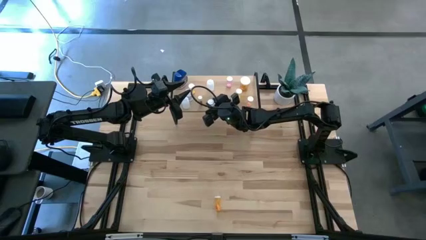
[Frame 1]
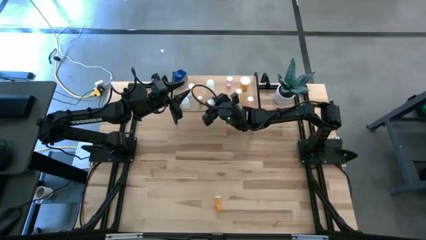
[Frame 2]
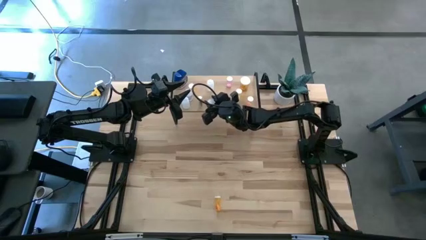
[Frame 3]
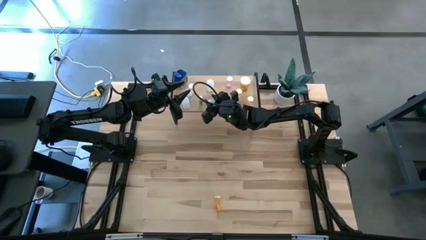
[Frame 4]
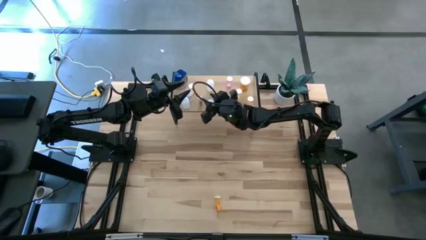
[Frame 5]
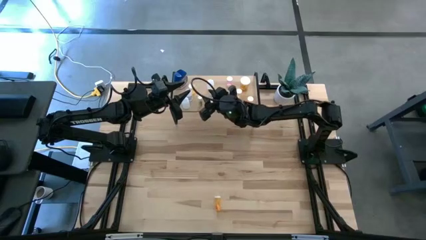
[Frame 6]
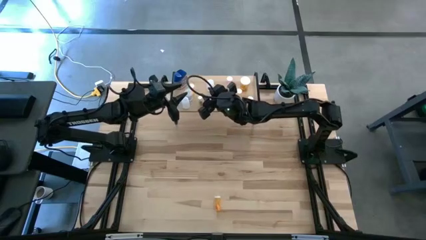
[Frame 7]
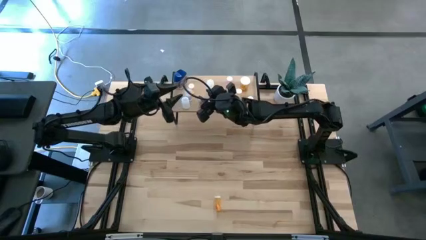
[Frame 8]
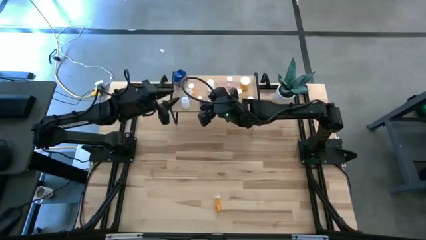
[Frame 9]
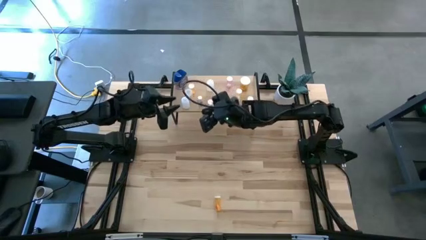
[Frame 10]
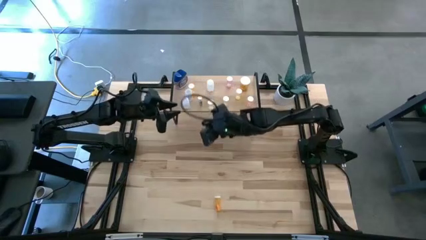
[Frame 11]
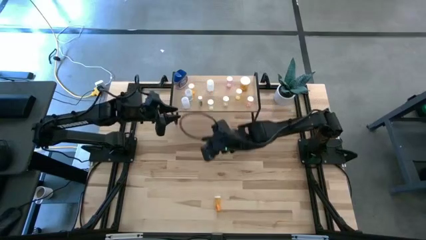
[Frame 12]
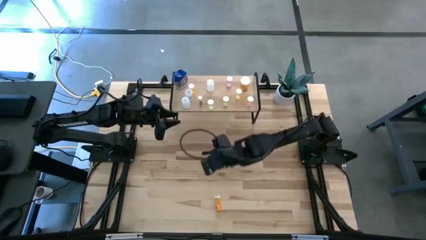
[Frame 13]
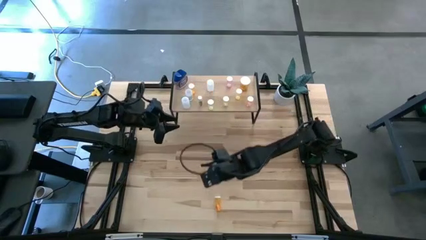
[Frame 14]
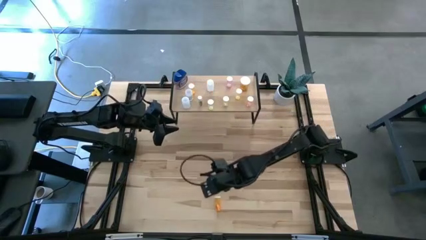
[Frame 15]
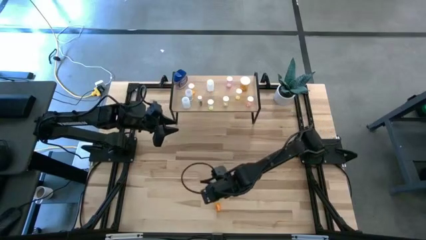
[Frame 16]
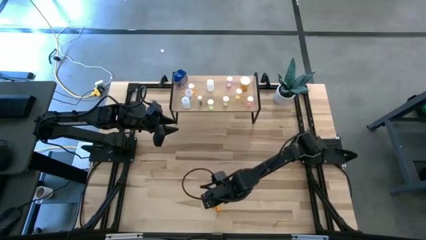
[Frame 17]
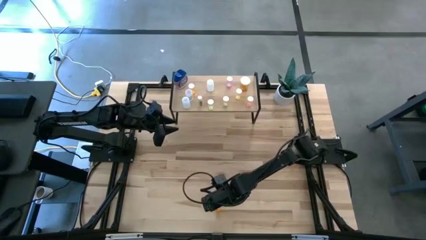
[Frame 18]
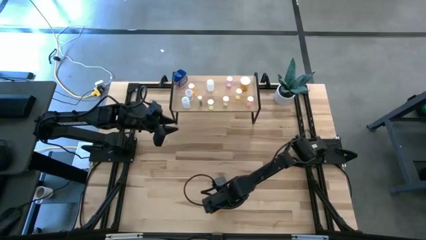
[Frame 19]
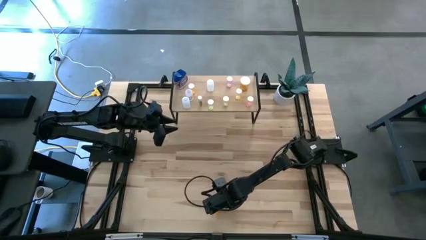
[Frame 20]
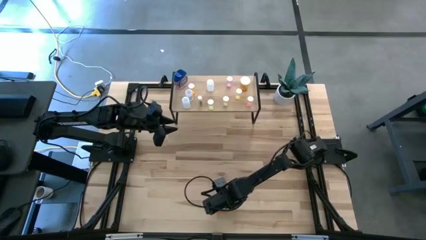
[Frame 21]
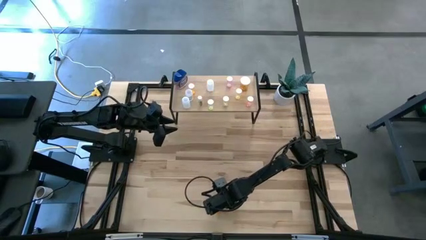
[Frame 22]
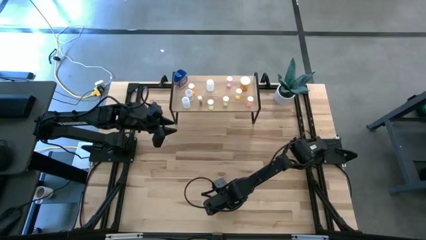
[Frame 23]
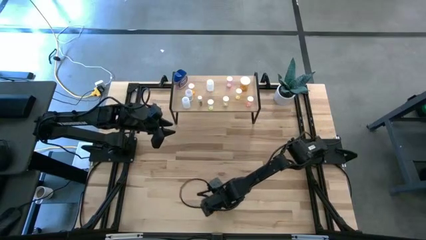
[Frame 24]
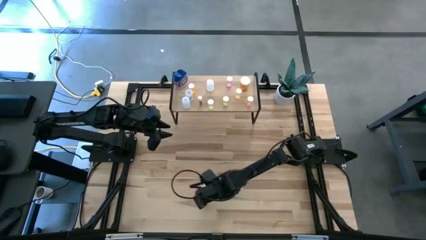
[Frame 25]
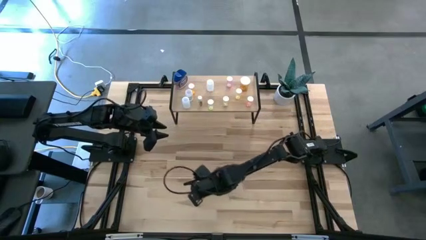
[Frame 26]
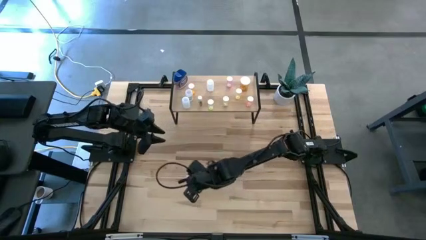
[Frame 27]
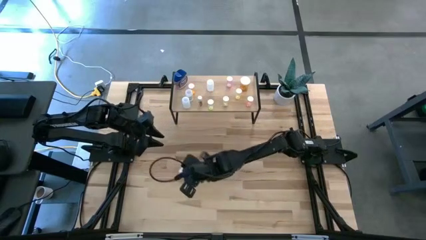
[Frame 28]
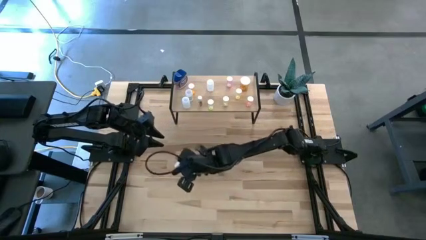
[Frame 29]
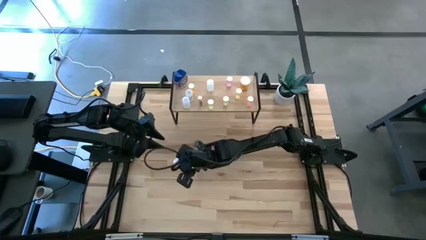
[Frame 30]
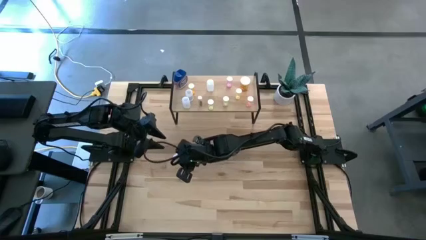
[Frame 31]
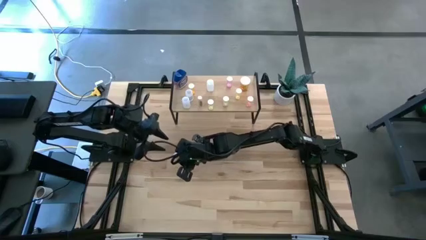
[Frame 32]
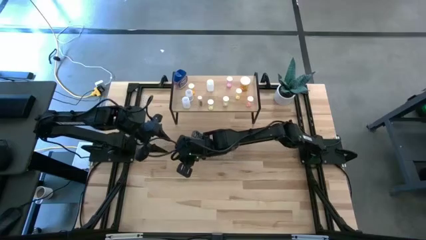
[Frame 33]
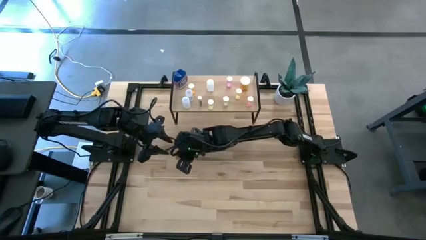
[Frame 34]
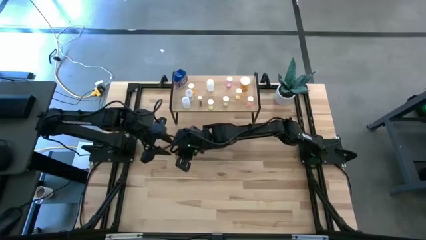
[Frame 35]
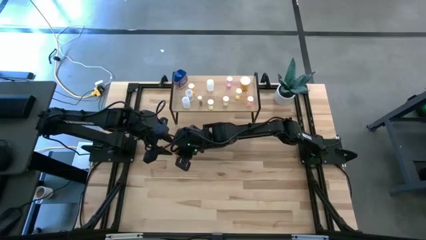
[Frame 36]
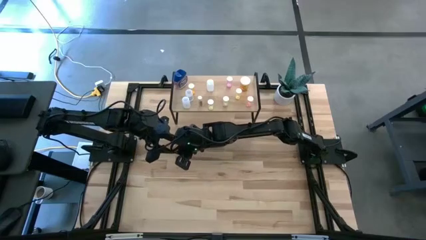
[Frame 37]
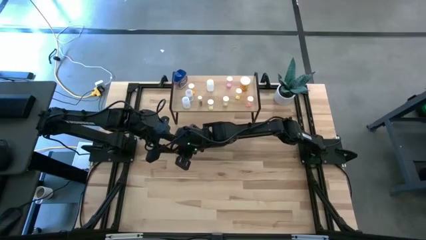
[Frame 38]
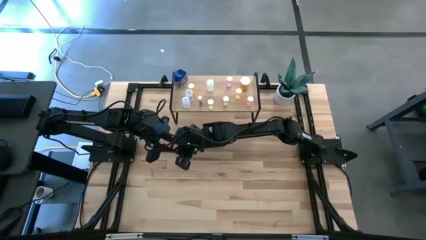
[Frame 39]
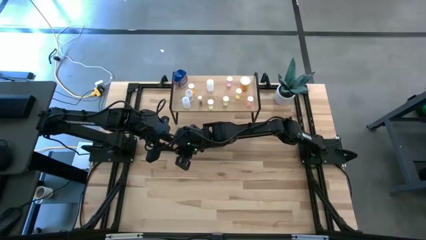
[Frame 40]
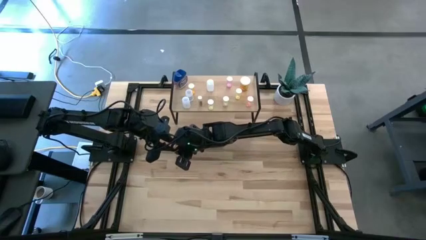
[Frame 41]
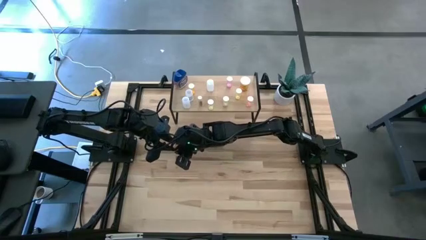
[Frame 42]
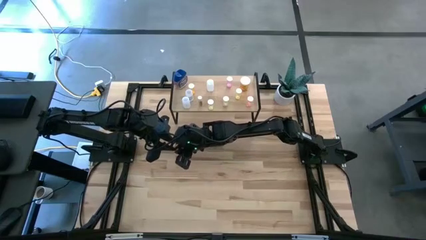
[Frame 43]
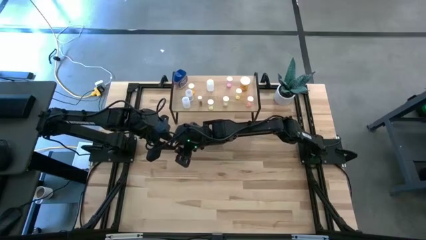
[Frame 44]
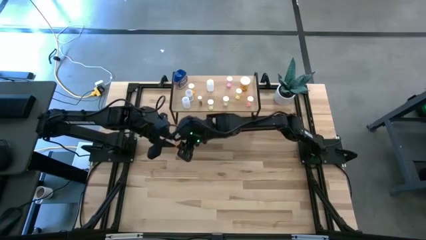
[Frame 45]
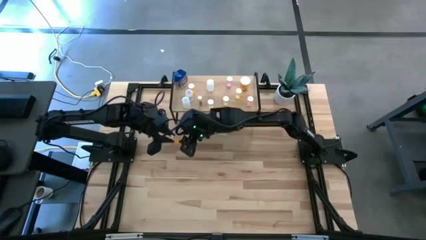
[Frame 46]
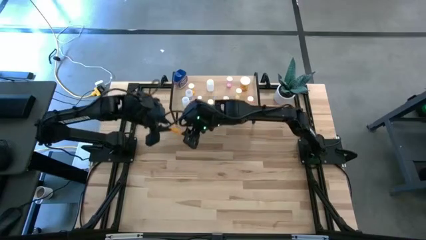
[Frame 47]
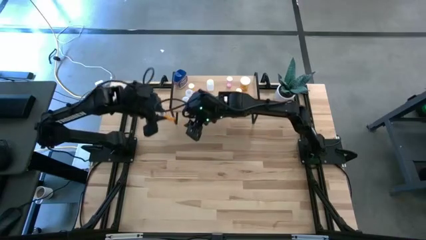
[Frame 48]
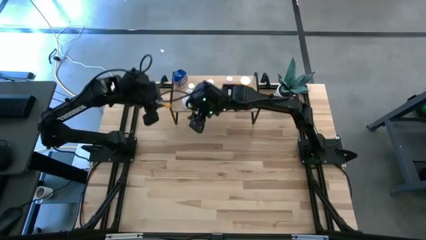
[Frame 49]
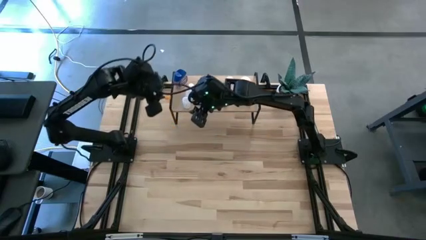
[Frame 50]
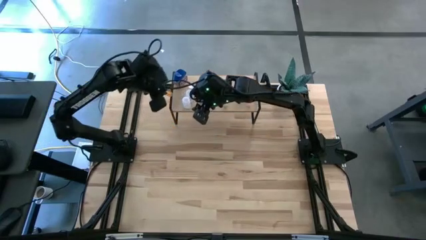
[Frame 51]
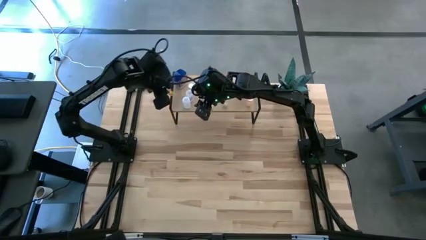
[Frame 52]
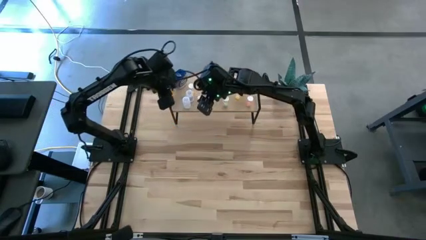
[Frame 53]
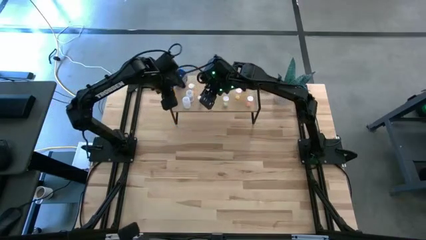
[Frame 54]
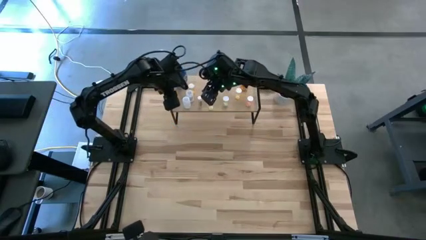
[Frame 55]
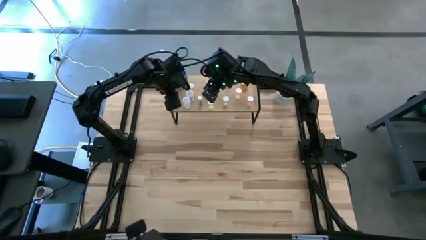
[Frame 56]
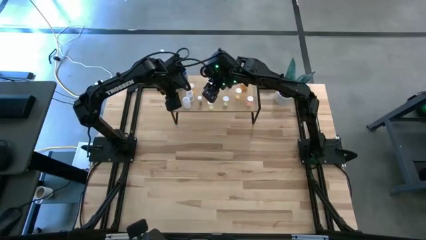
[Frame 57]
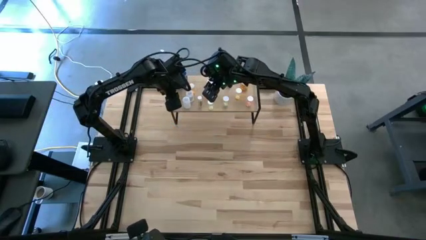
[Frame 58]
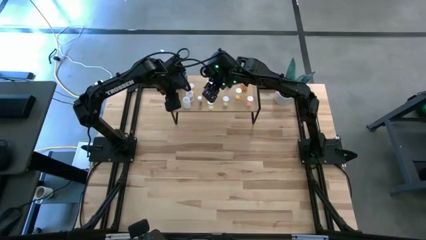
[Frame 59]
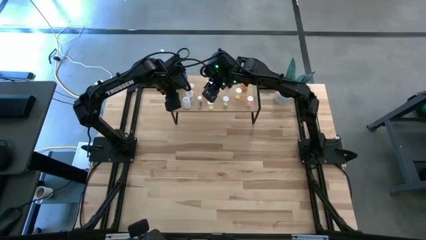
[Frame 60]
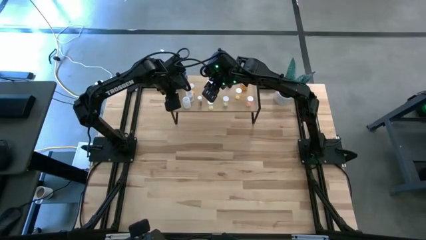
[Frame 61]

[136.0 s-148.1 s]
Task: Pick and place medicine bottles onto shelf by color
Put the small orange pill bottle on the shelf

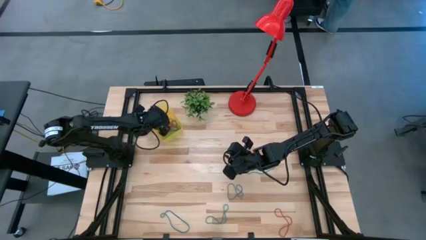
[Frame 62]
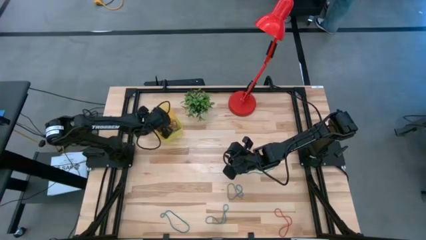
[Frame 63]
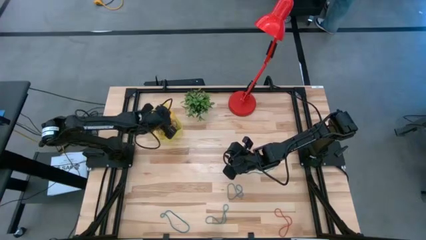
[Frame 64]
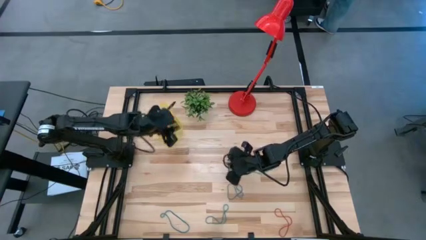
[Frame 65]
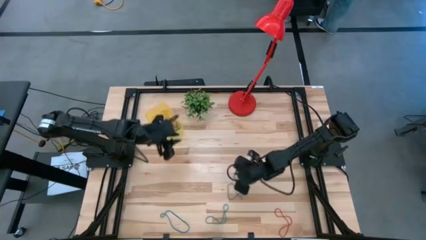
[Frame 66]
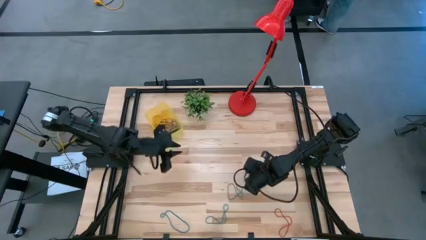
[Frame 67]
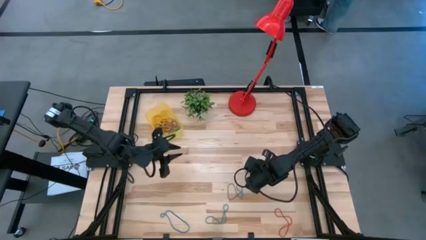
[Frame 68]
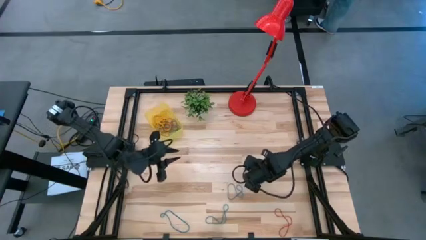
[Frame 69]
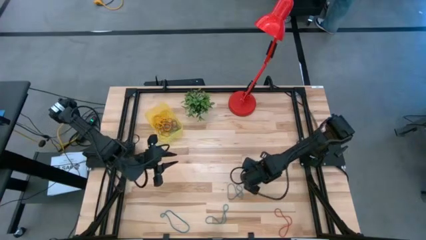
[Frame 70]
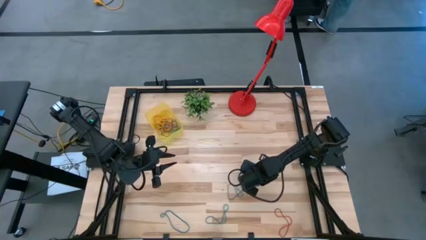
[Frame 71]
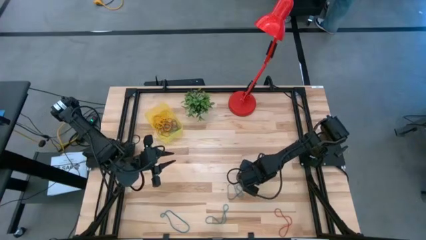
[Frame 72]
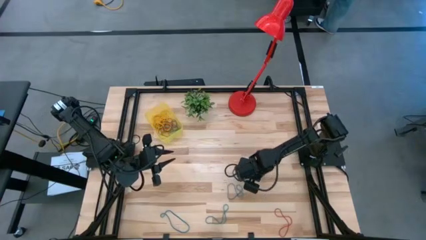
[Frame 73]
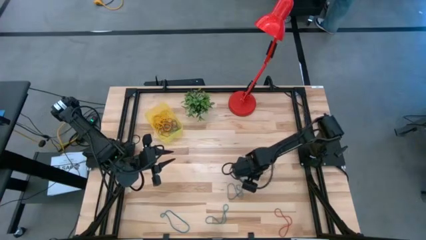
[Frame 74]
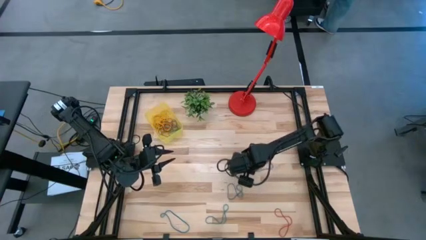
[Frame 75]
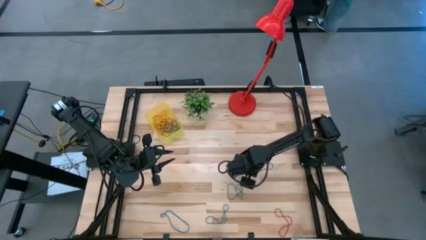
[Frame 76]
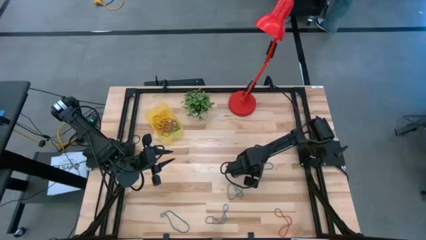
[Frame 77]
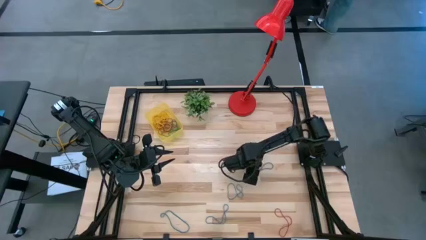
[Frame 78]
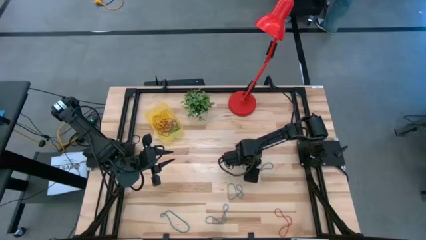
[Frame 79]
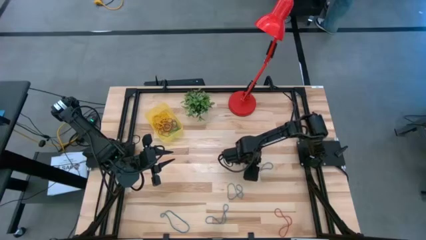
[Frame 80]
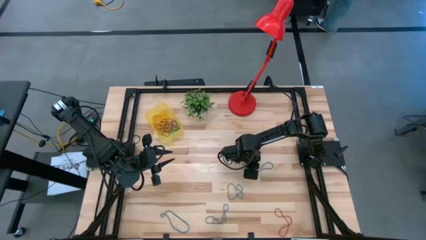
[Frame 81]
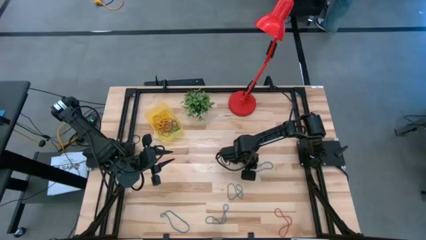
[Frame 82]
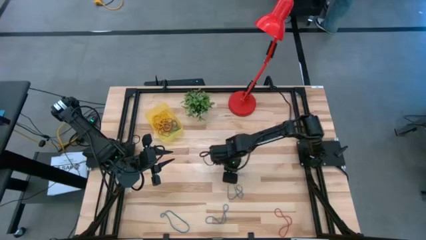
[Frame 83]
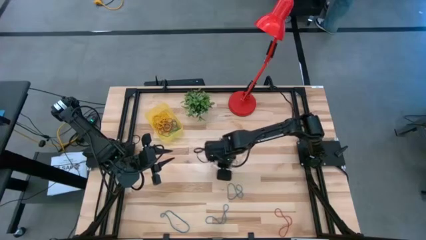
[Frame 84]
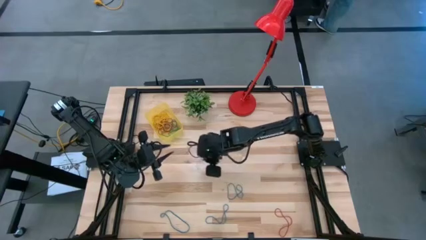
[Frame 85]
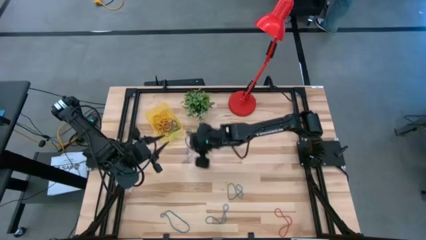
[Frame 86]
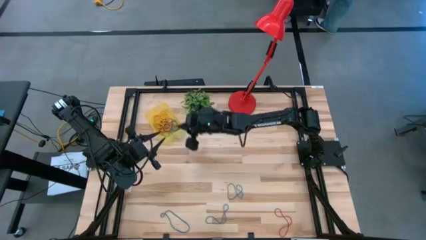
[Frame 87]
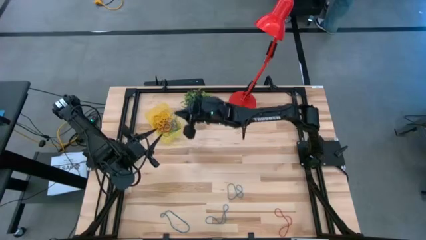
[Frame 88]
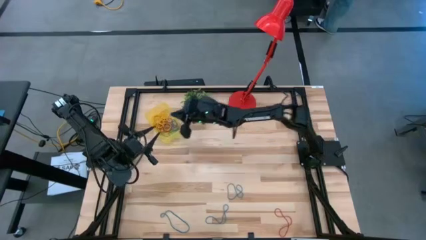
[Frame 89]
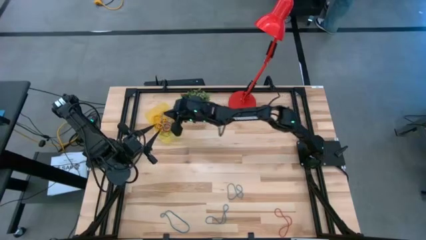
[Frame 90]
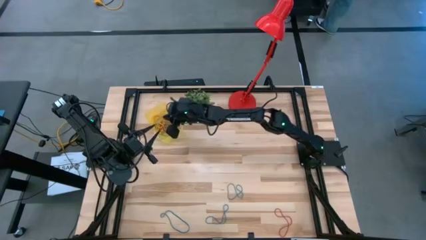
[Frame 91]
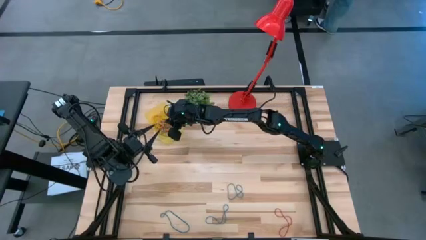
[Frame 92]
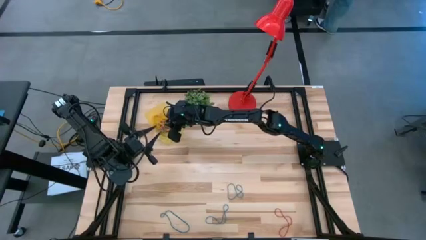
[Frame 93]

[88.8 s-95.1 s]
Task: Pick and place items into bin
Put the blue rubber band into the yellow bin
